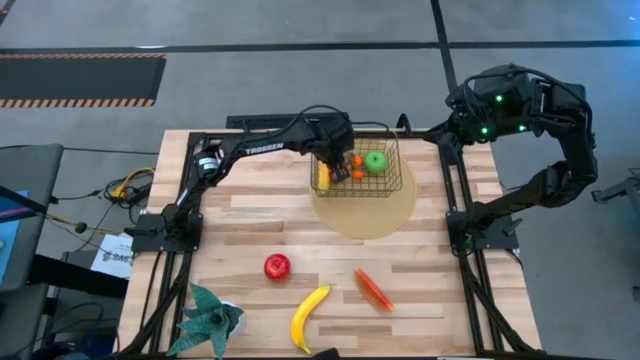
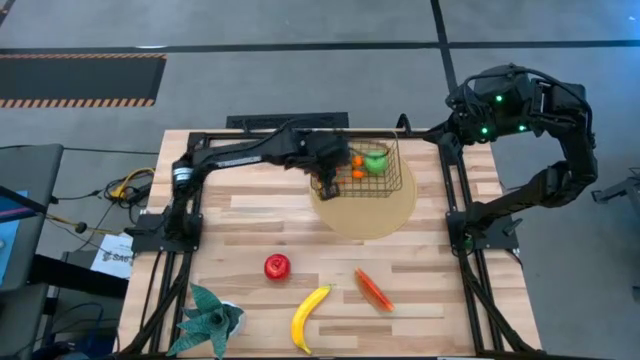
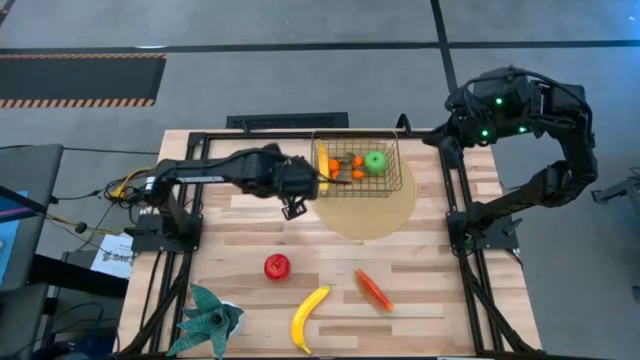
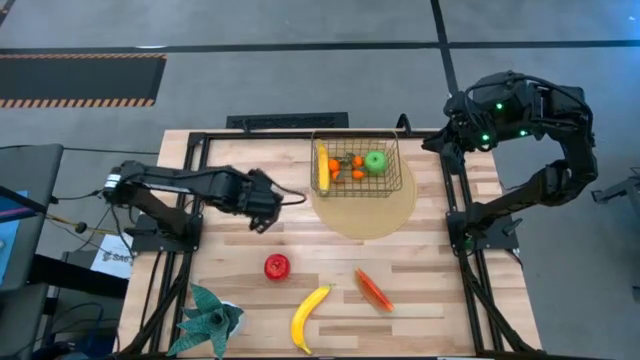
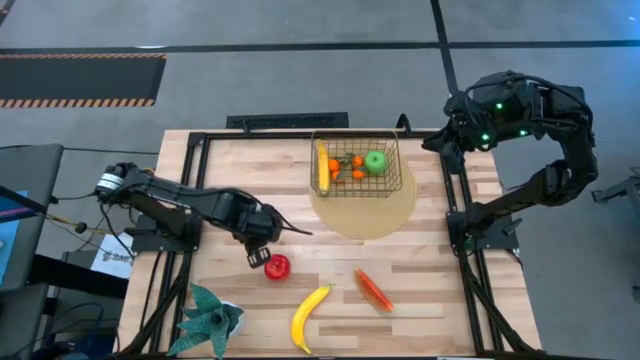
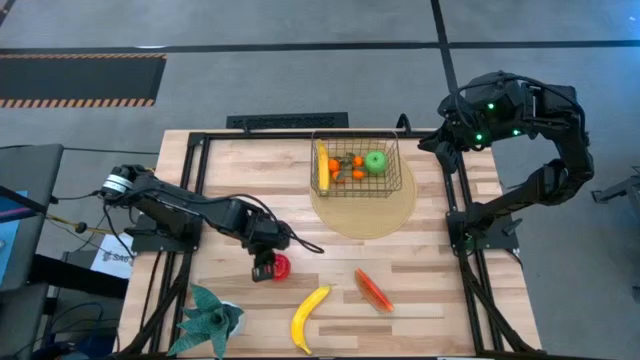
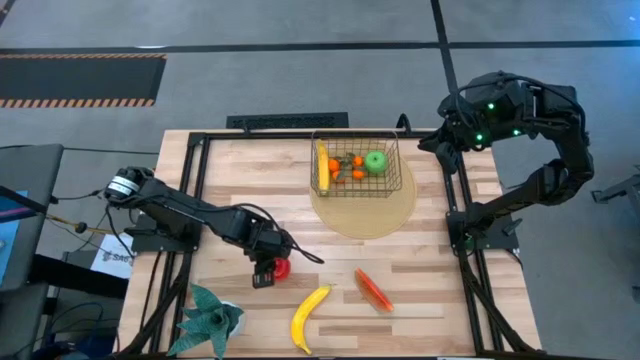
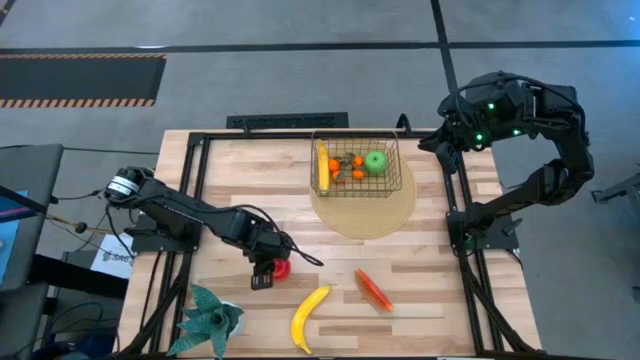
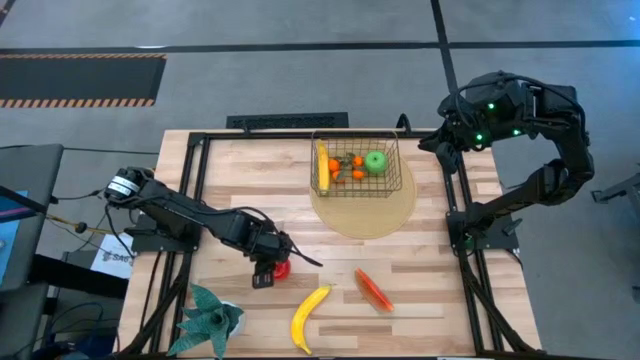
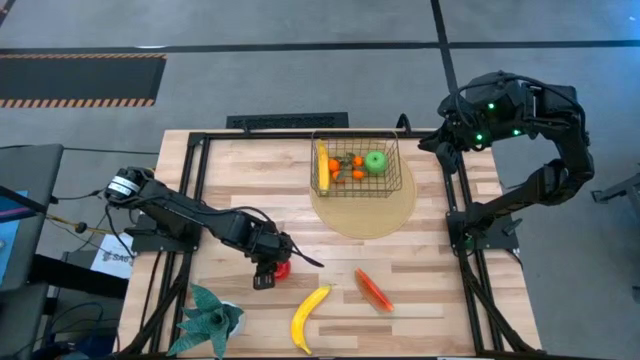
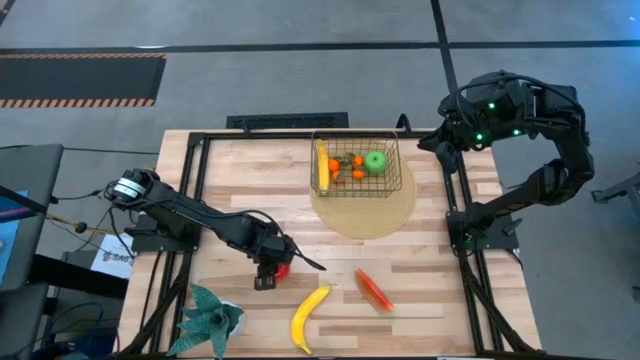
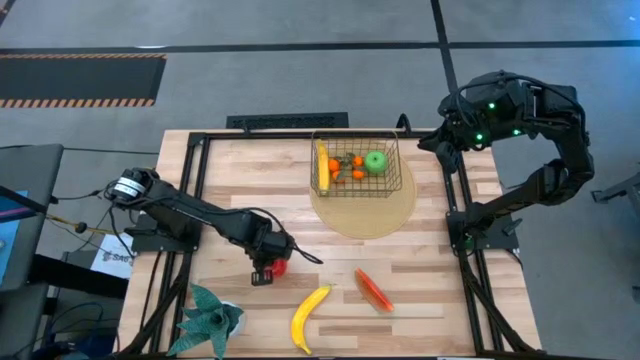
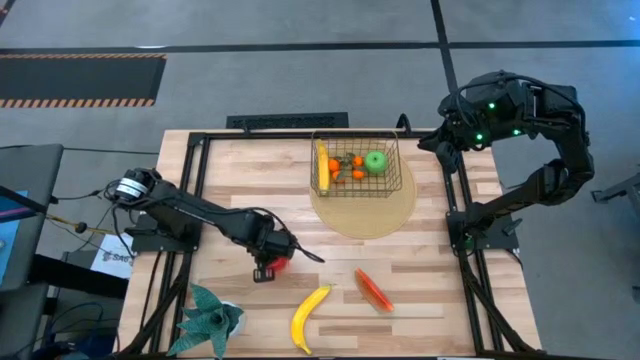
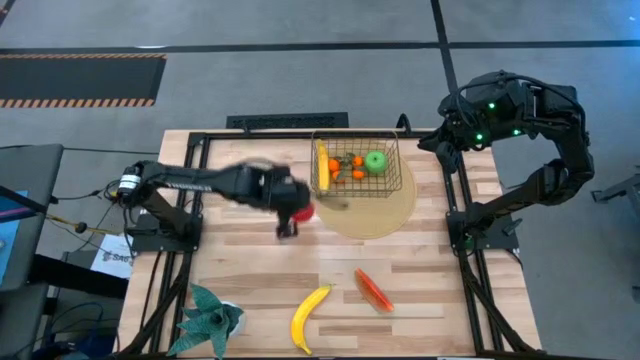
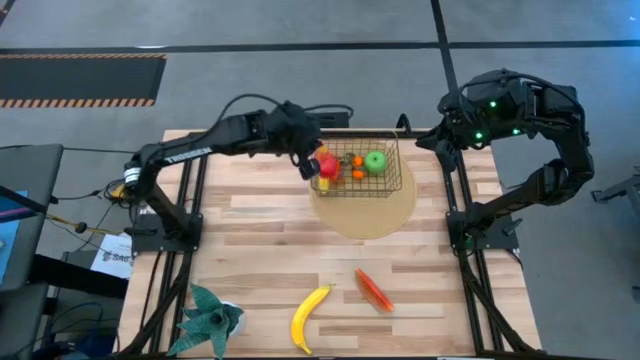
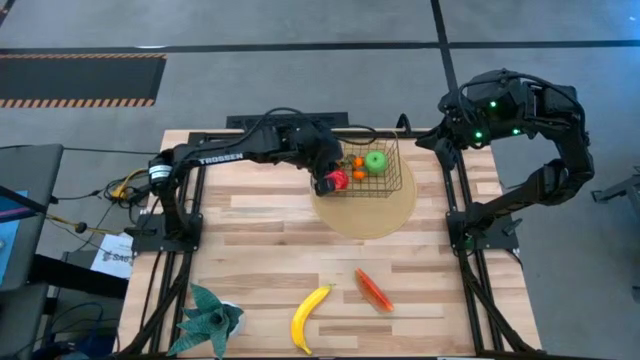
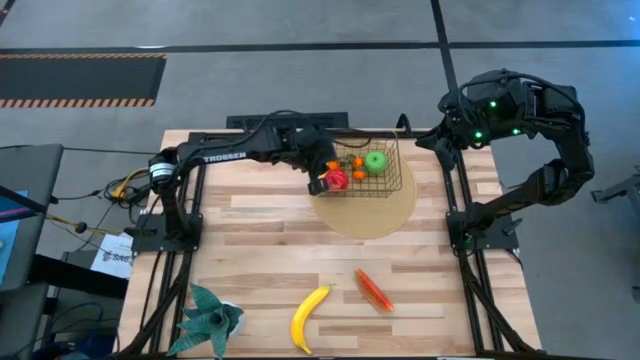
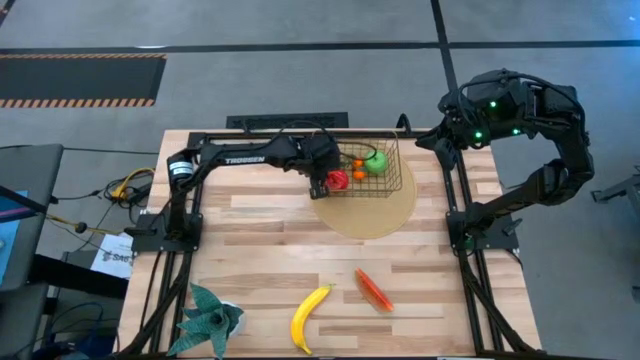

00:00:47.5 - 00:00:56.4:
Task: Build produce basket
Put the red apple into the wire basket

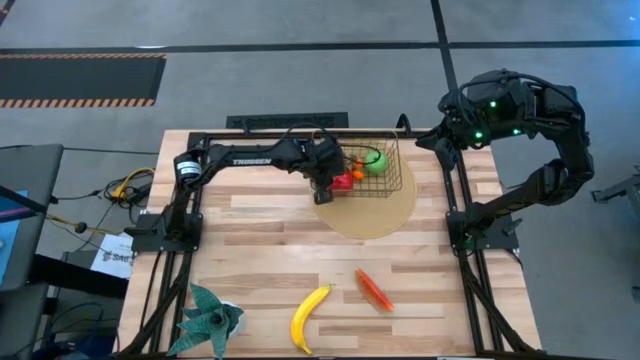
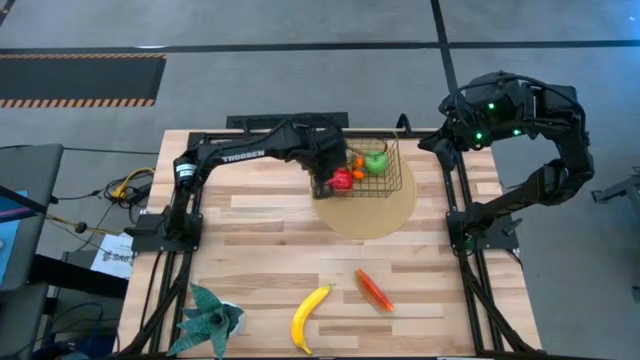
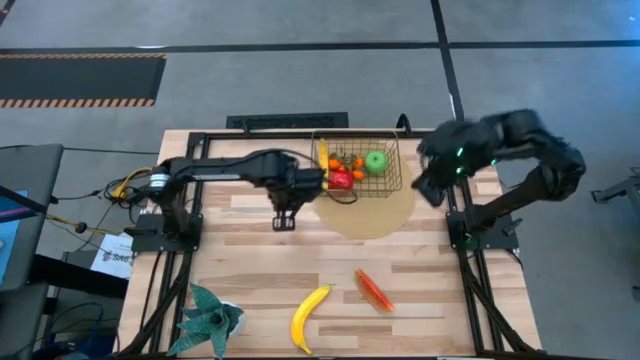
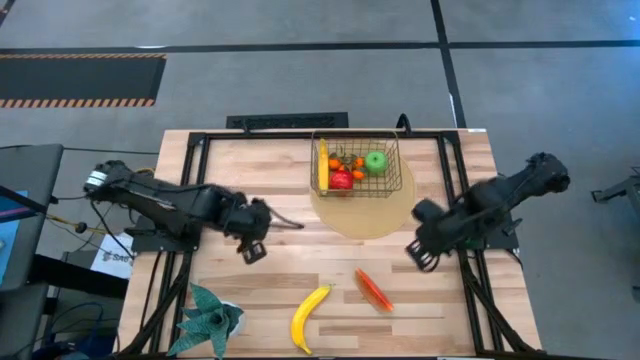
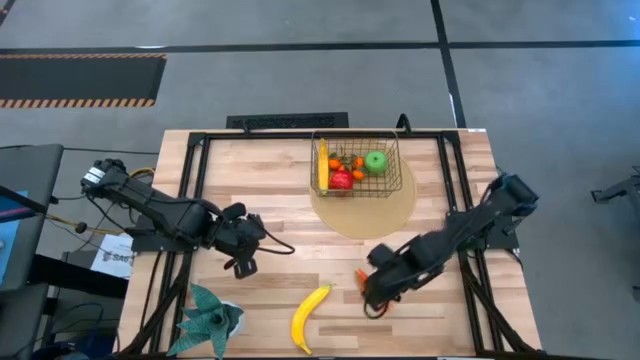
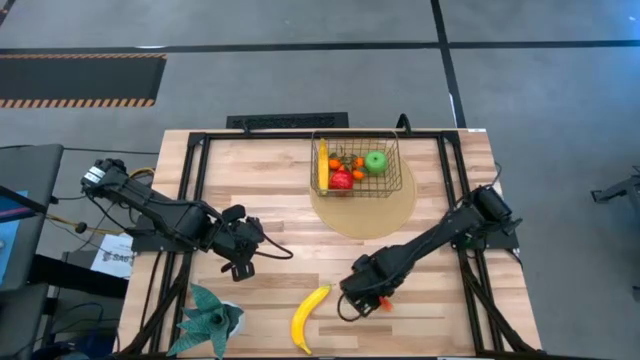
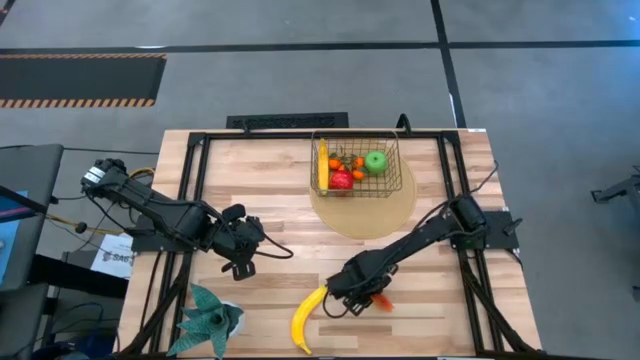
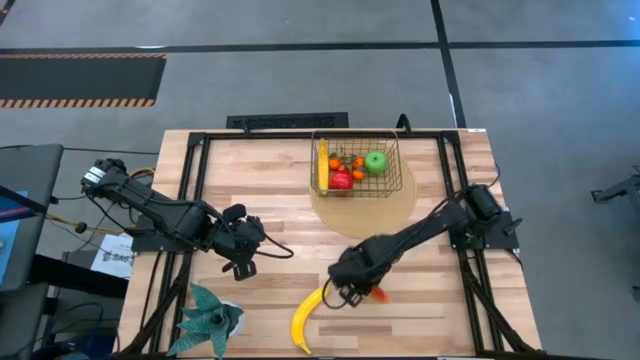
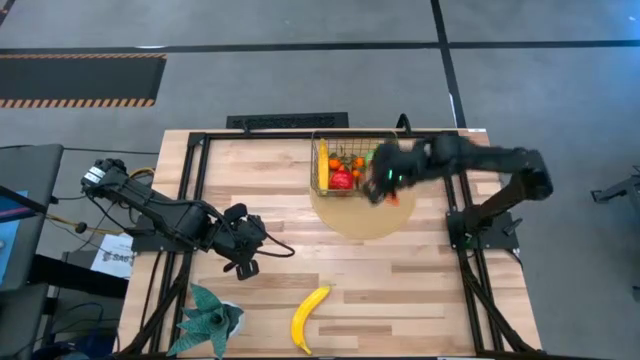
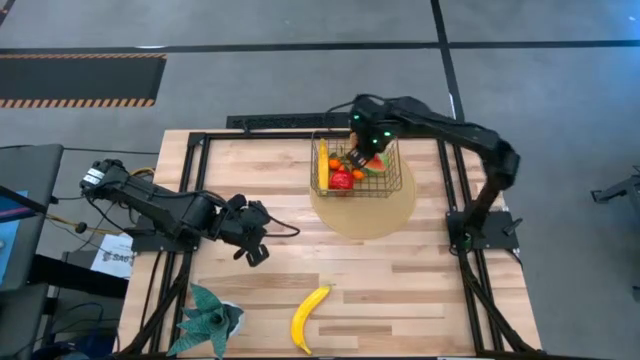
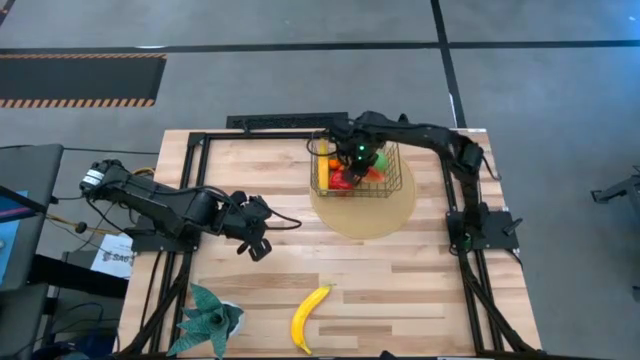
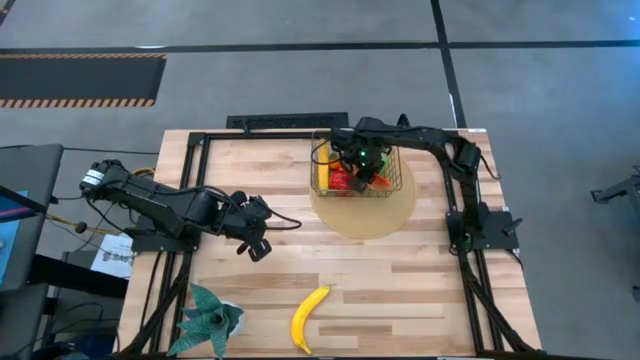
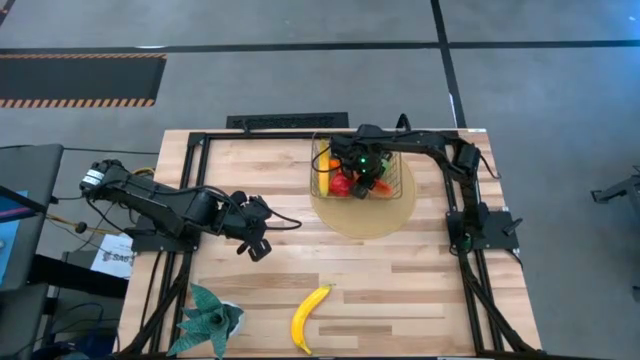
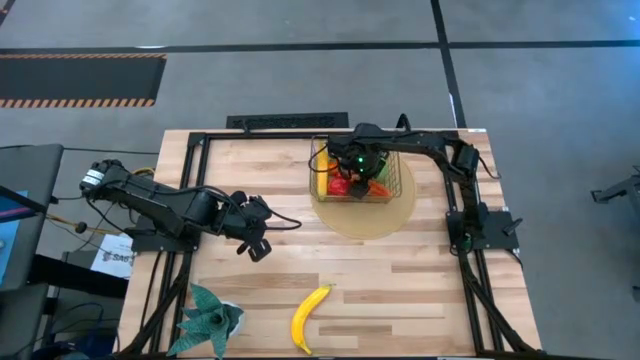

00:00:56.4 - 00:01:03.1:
Put the red watermelon into the wire basket

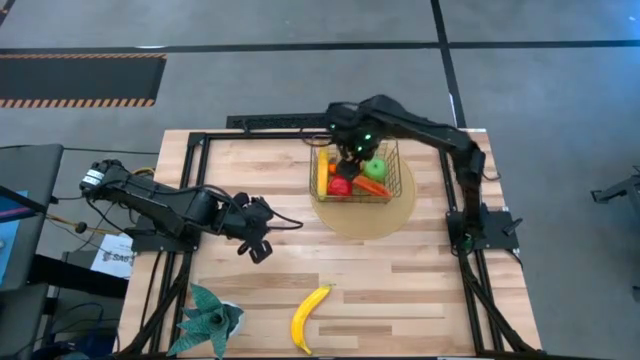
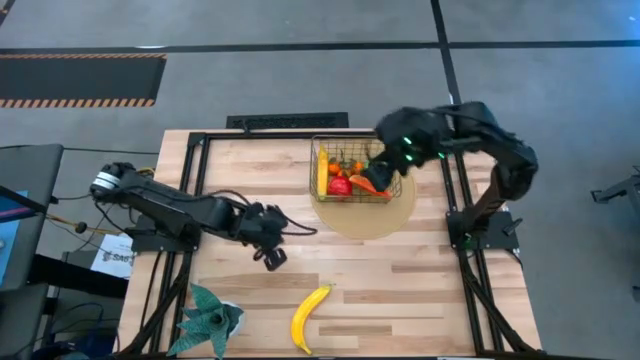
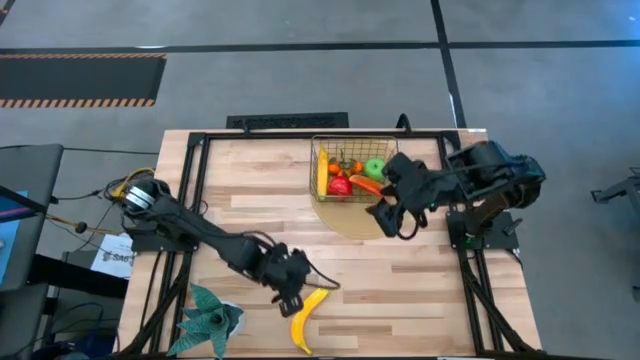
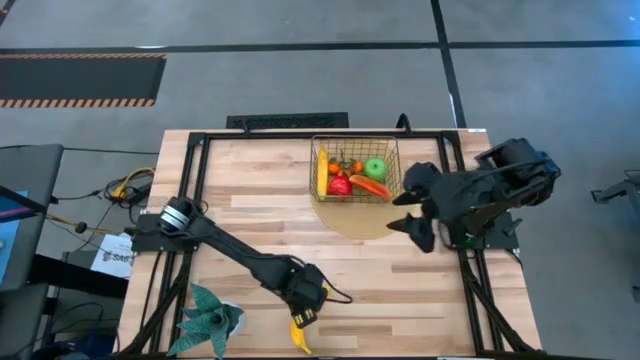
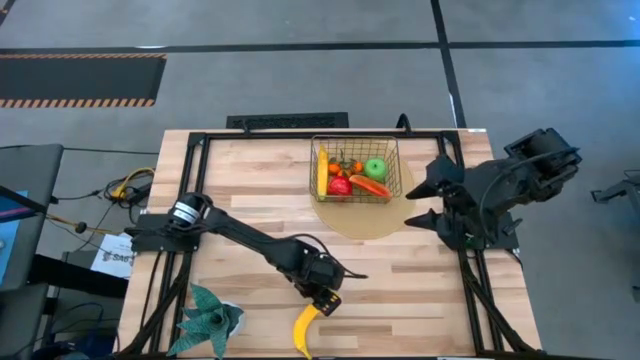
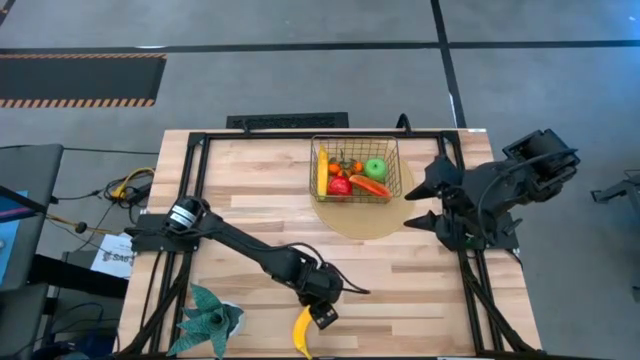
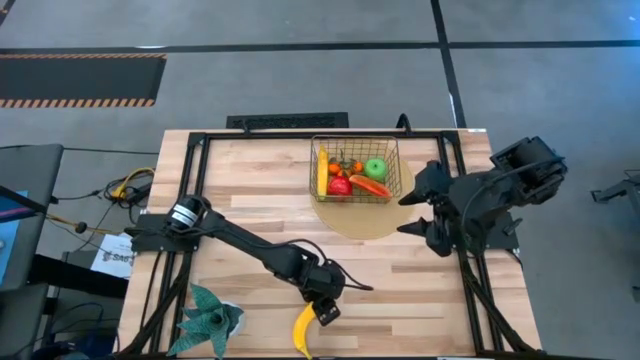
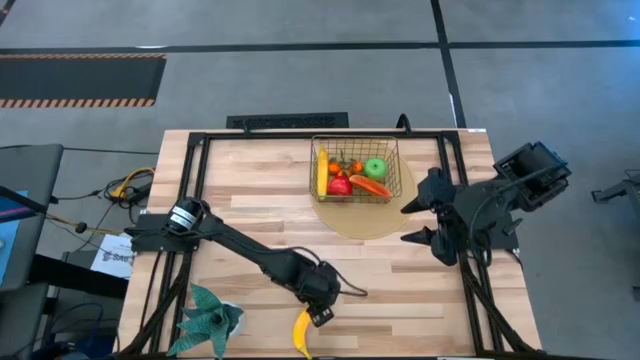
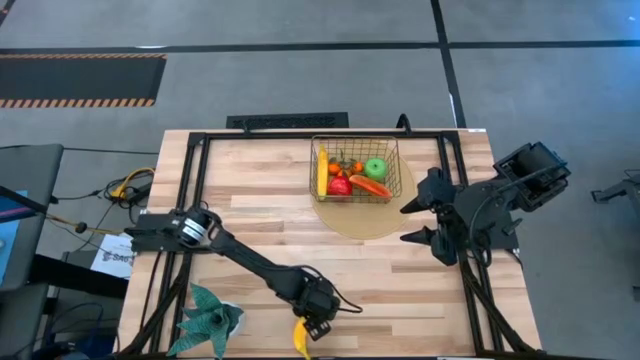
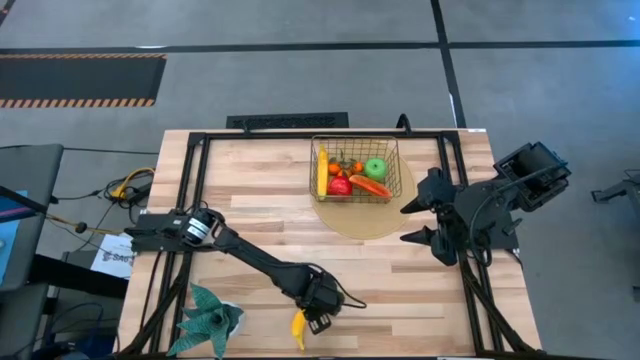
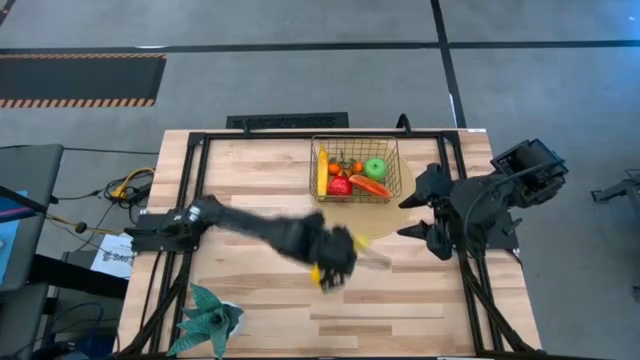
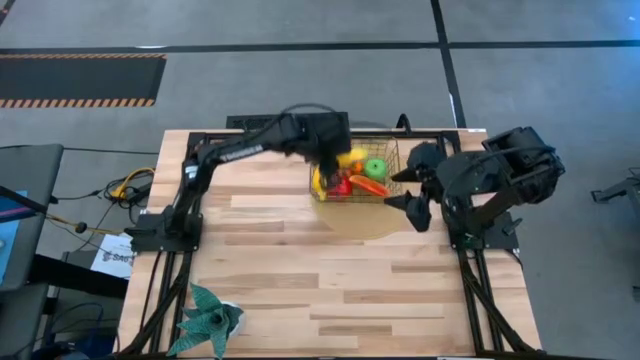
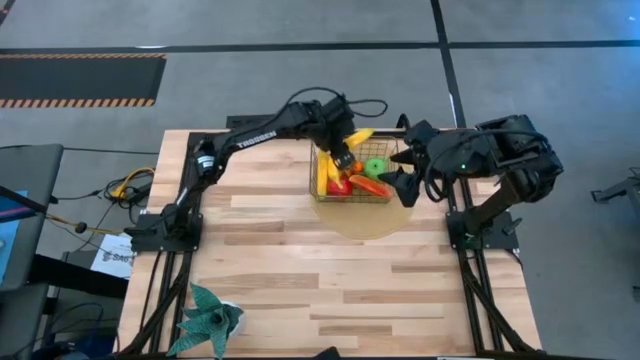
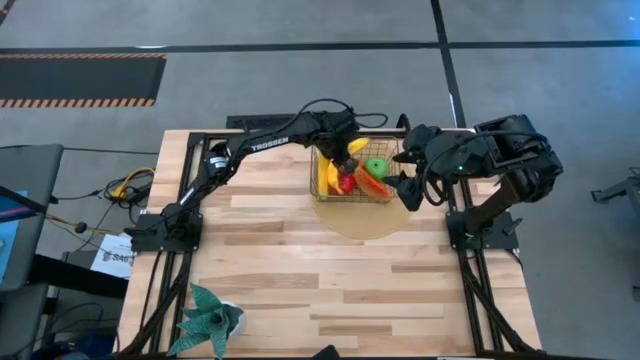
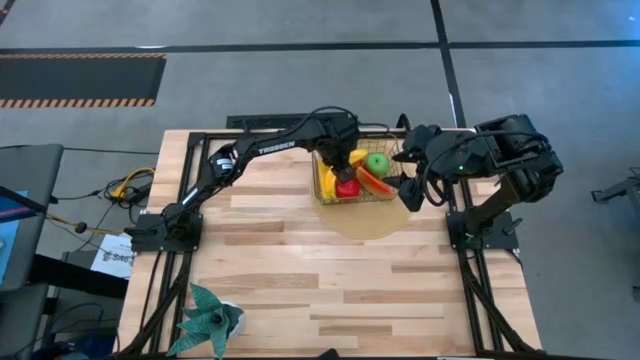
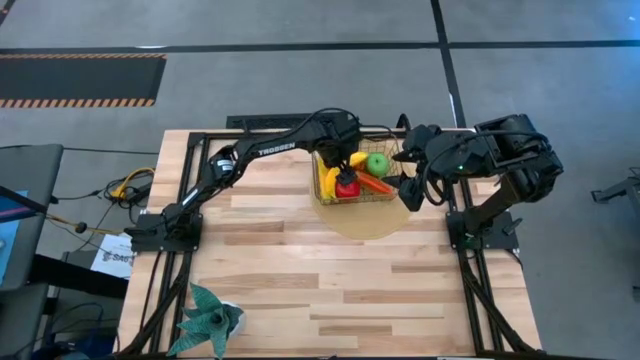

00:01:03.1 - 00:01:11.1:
Put the yellow banana into the wire basket
